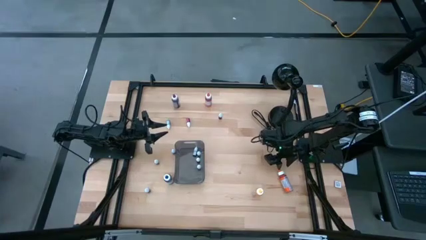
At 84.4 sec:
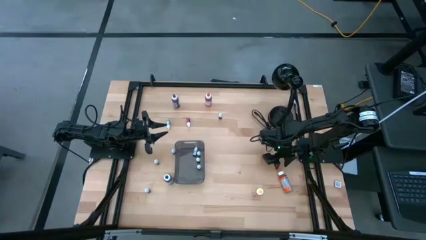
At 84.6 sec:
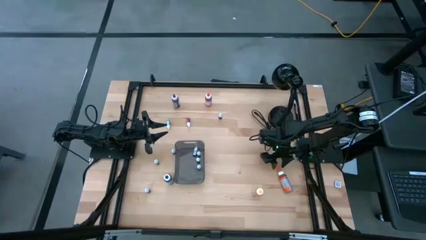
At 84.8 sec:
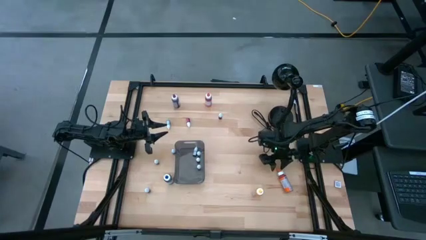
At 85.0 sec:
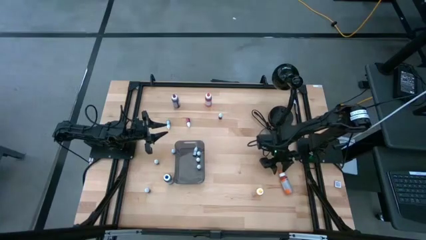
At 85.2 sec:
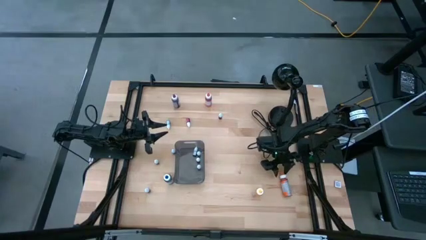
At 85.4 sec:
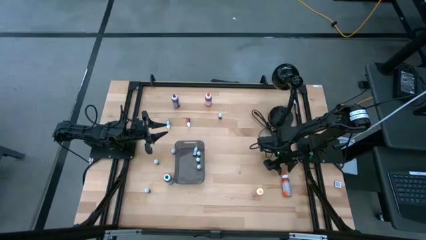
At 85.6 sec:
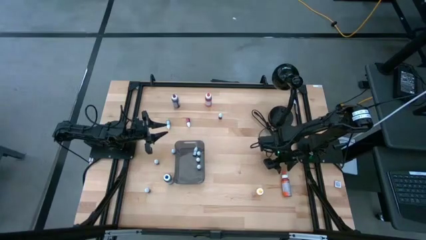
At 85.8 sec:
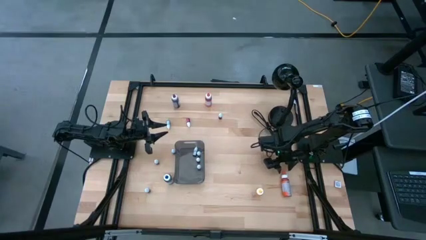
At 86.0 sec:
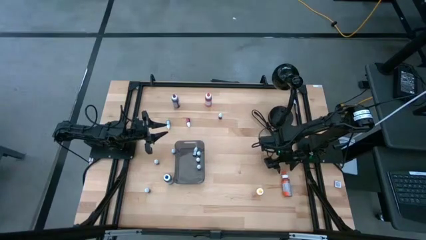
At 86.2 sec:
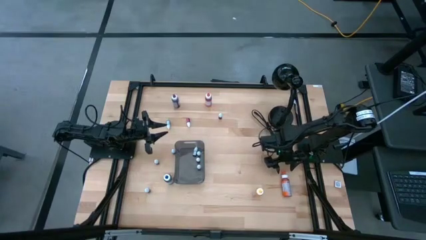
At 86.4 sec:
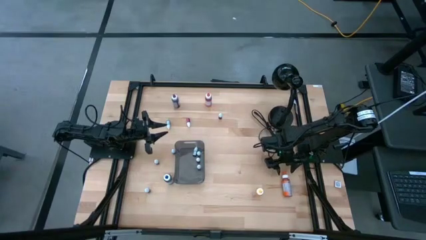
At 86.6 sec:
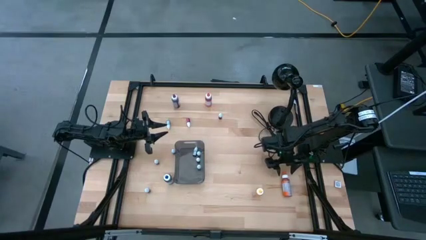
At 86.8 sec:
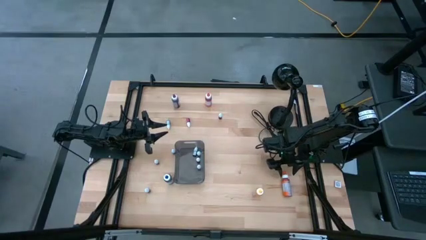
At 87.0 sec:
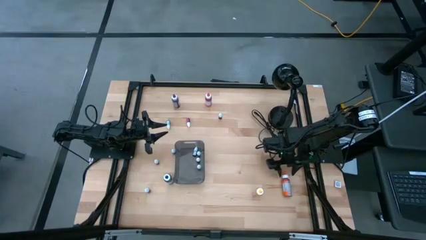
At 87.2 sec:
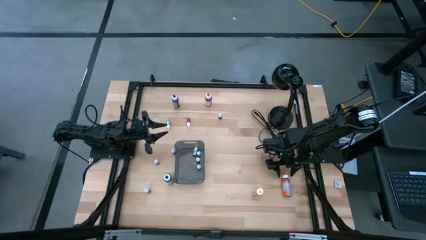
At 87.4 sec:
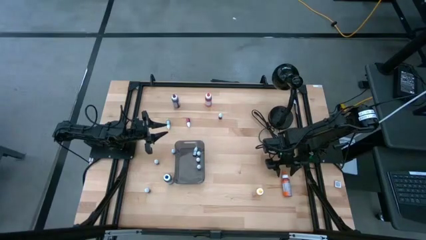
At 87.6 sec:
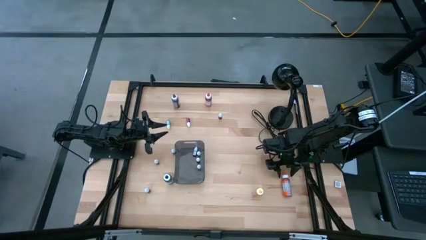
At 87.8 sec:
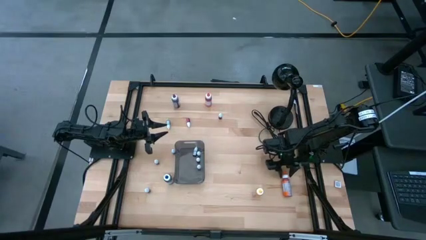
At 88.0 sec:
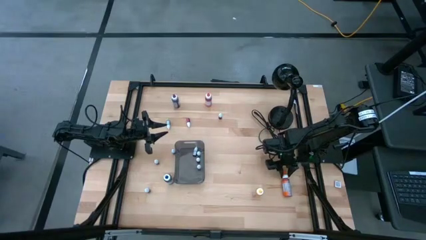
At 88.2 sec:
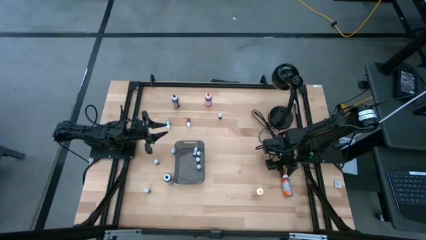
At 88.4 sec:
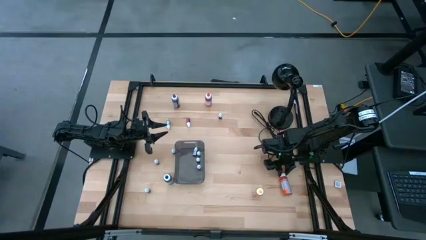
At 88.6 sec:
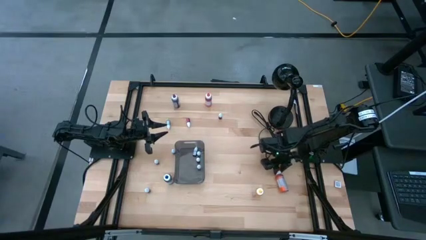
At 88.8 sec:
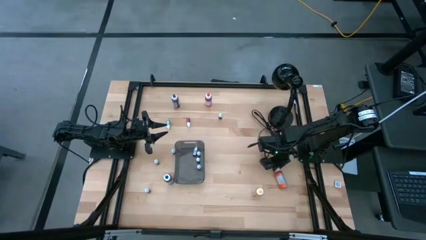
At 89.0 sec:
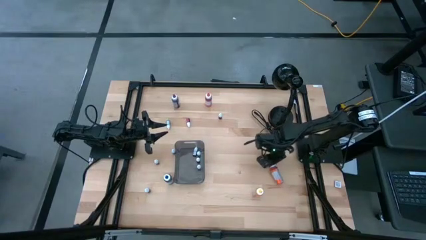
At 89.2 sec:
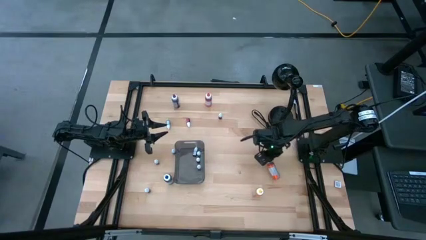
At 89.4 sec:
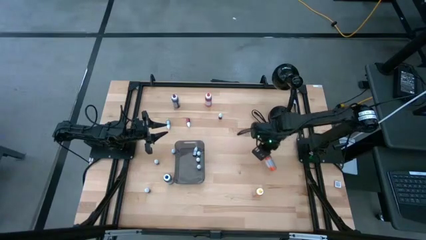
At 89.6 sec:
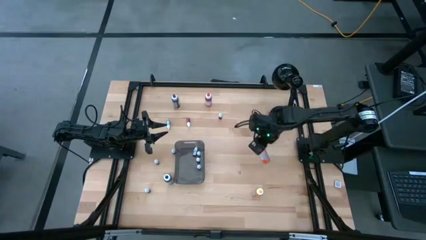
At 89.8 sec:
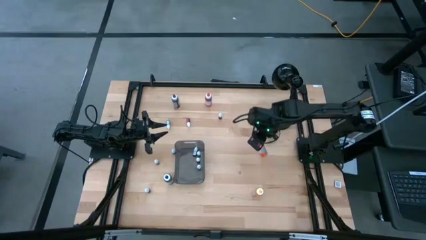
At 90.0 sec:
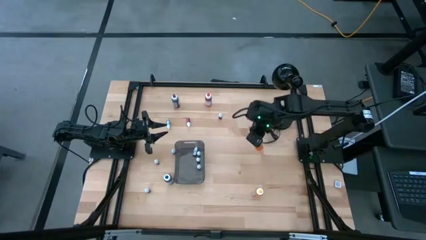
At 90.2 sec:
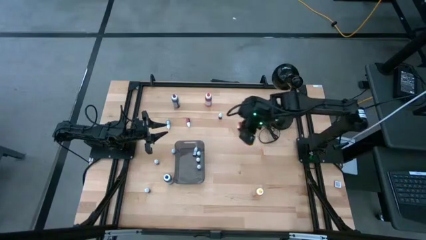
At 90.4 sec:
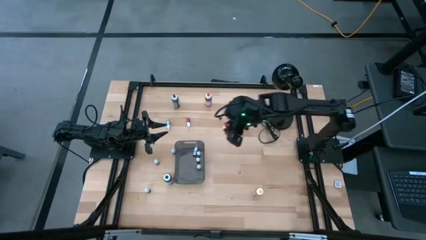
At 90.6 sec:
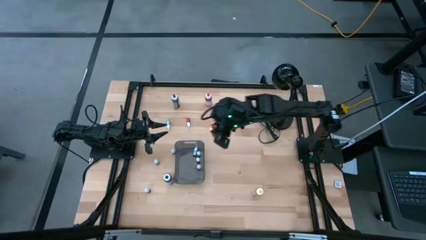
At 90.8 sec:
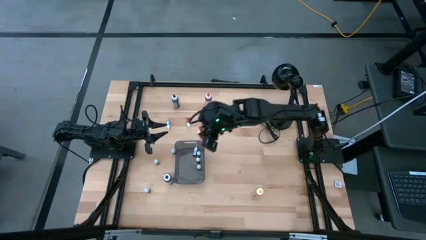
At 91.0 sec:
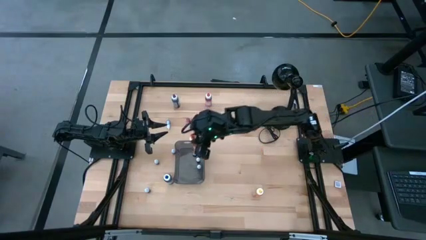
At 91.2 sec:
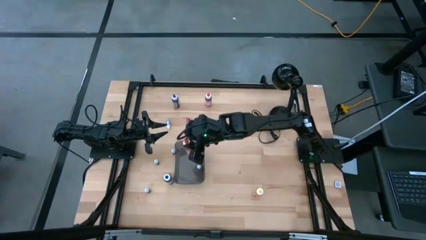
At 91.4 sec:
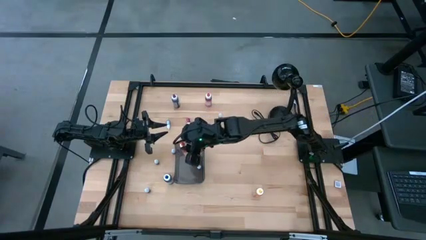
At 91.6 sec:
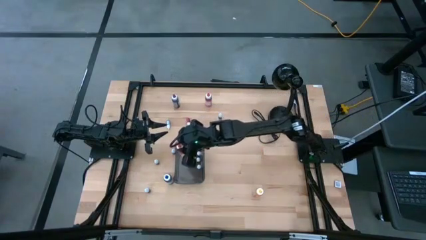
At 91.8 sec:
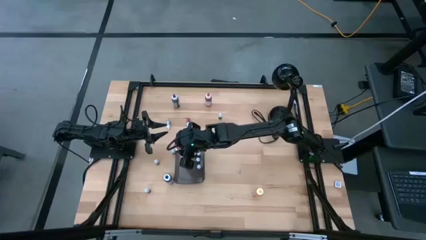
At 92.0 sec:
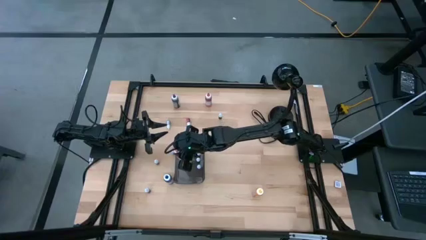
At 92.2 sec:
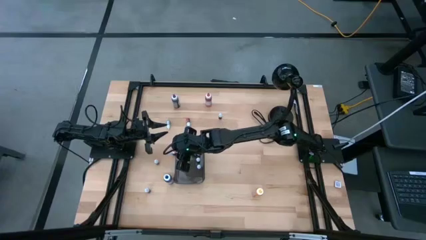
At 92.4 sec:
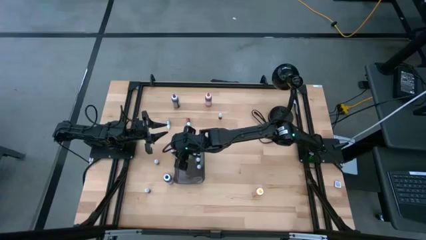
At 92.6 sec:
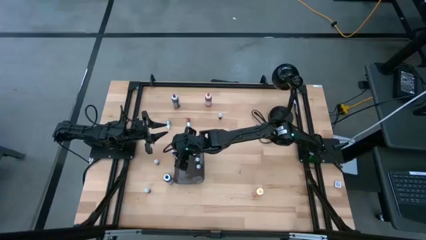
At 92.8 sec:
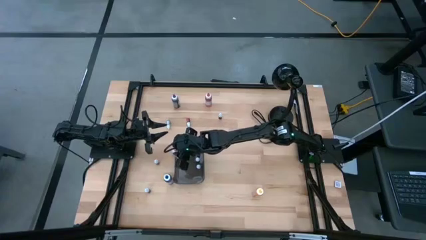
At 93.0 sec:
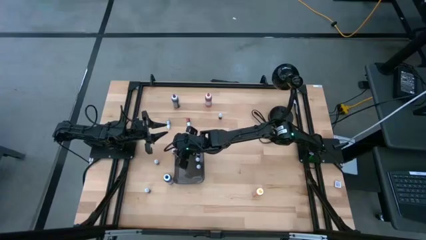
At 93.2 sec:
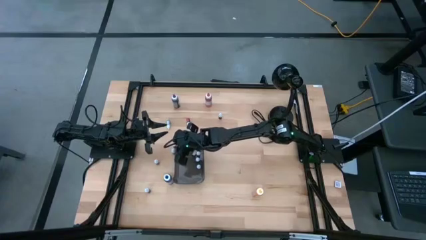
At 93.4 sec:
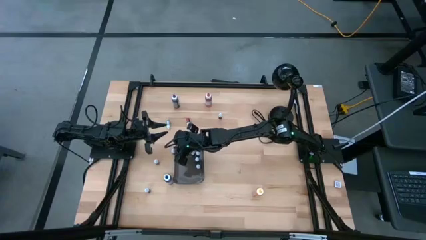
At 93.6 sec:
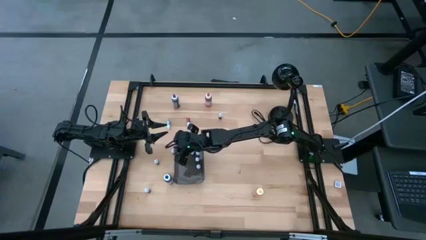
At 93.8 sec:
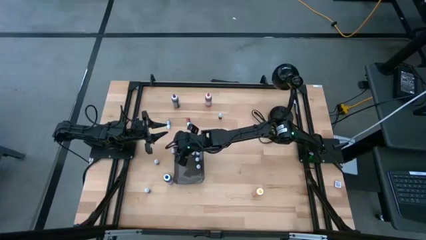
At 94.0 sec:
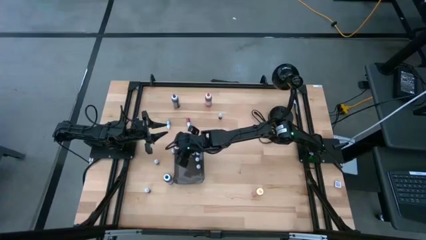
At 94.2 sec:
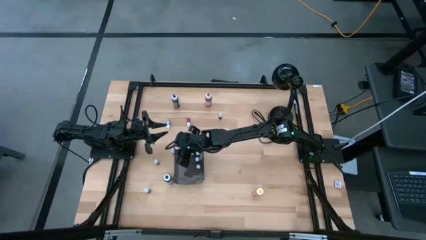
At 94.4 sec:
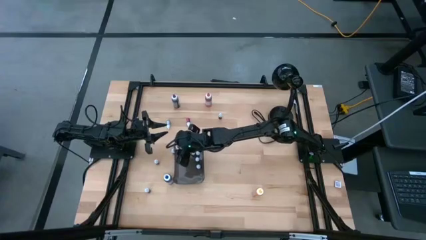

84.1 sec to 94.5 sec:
Task: Pick & Place food coloring
Put the orange food coloring bottle into the bin

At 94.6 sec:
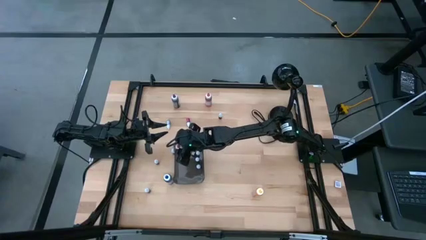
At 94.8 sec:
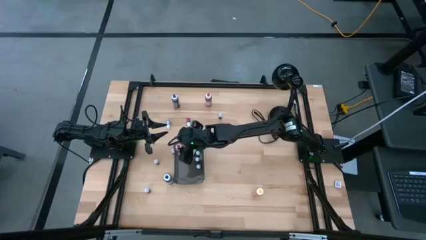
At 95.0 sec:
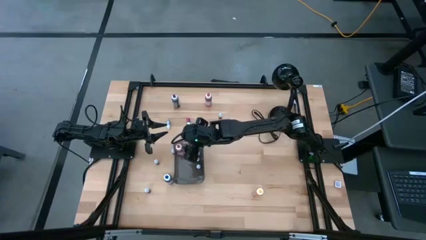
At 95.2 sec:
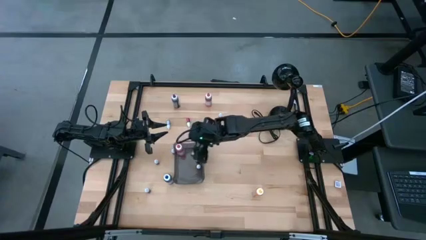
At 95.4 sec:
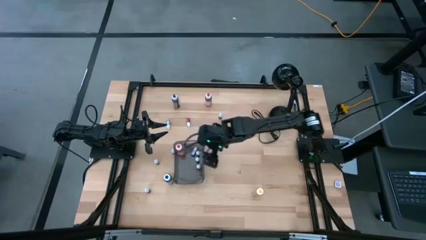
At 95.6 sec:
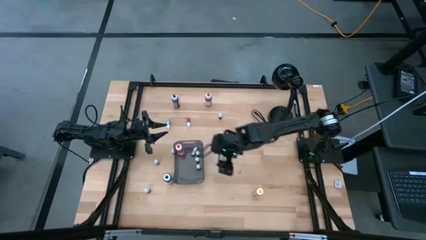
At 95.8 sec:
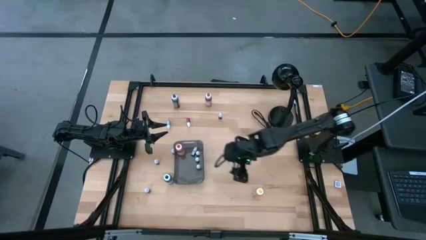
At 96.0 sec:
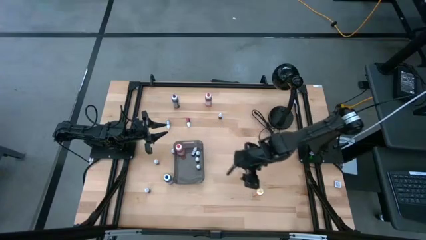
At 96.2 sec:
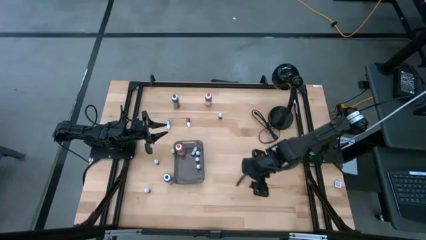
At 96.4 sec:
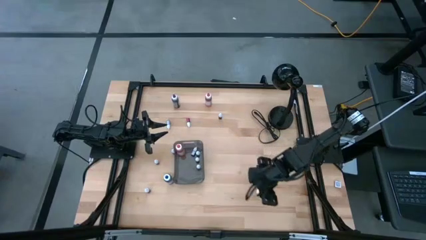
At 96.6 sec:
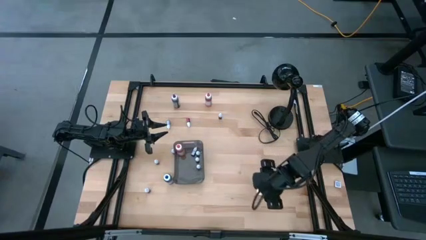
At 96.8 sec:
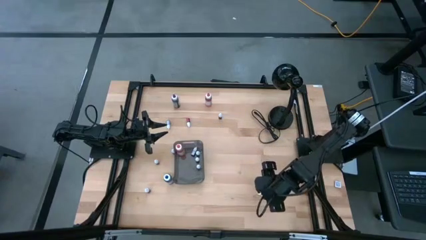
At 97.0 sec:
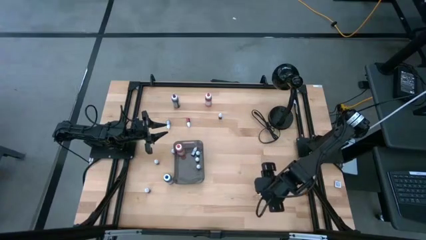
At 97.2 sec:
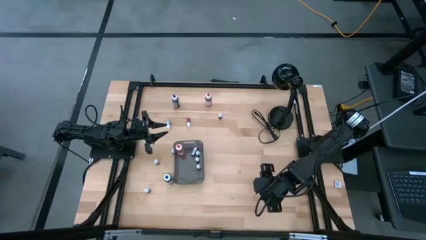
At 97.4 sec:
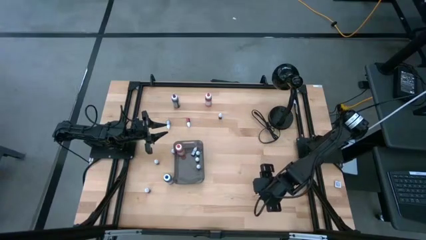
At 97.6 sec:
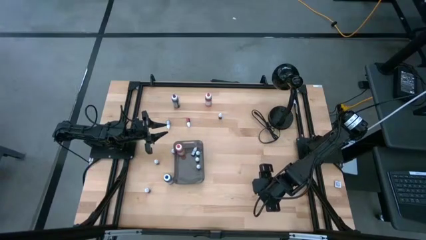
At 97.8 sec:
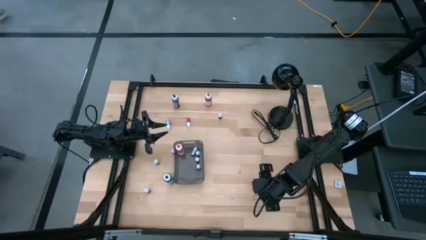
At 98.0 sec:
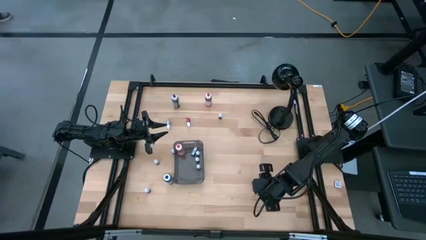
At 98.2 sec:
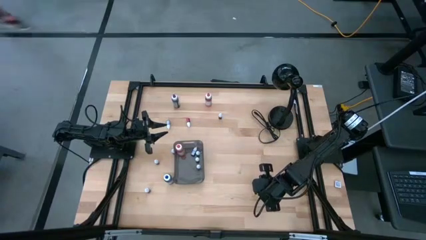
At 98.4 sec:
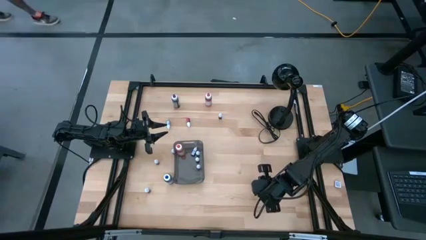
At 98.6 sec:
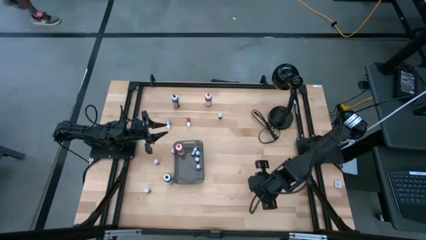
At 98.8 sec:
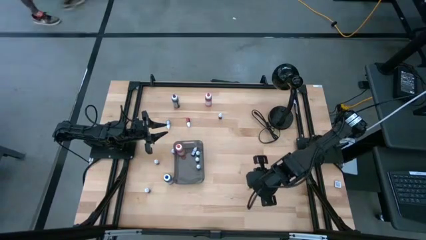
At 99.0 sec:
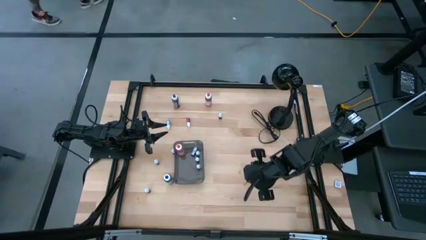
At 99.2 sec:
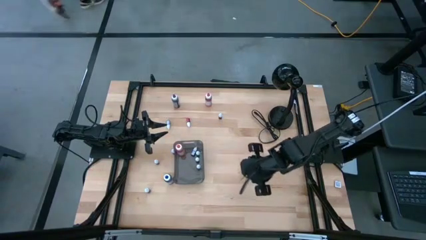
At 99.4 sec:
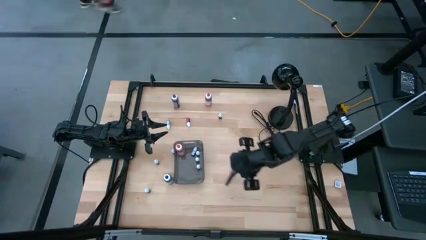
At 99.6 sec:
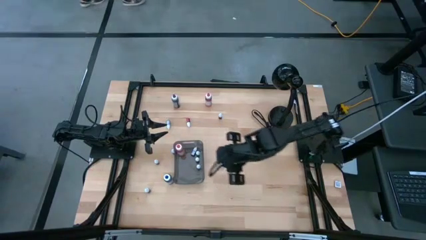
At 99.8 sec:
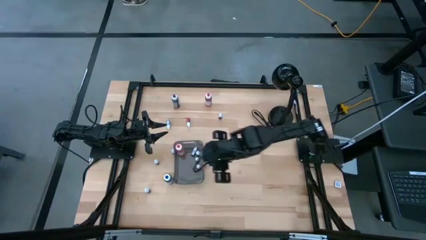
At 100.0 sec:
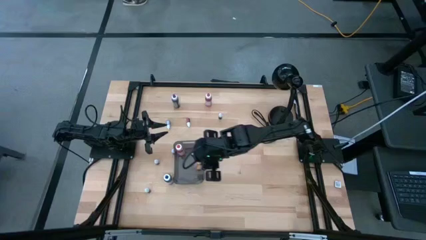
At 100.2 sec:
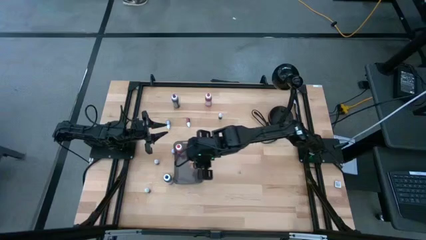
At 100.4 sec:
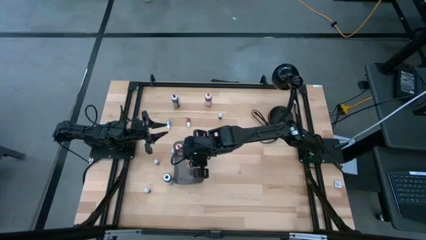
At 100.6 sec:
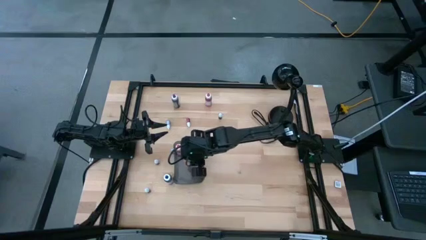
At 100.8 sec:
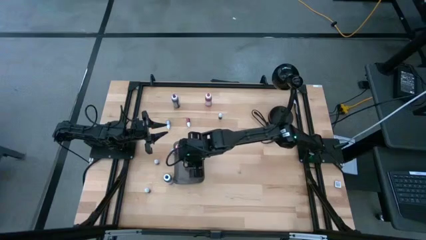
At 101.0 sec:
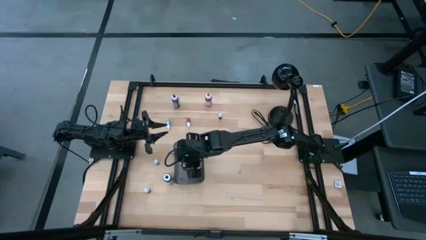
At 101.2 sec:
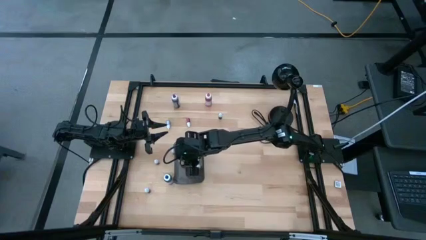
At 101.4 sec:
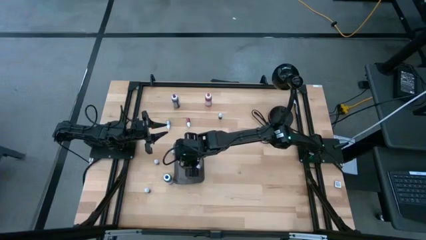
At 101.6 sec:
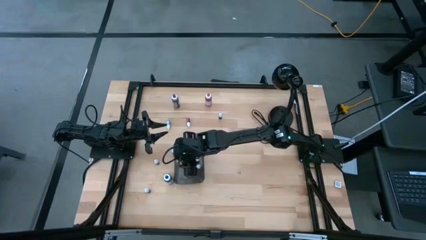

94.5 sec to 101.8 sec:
Put the yellow food coloring bottle into the bin
